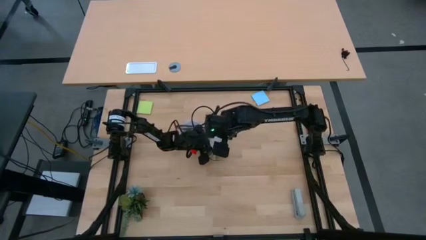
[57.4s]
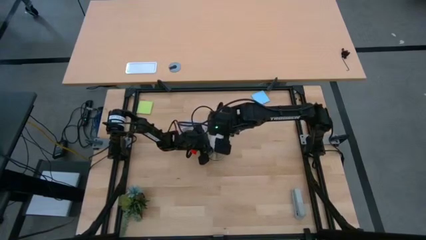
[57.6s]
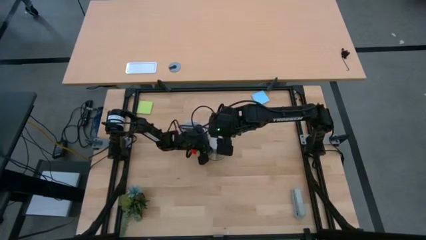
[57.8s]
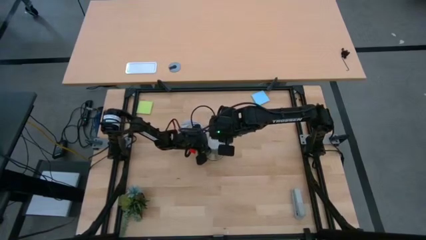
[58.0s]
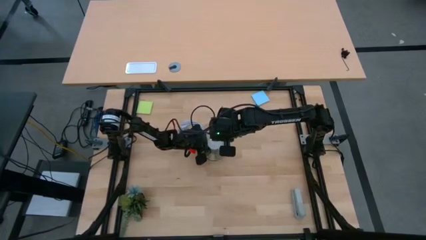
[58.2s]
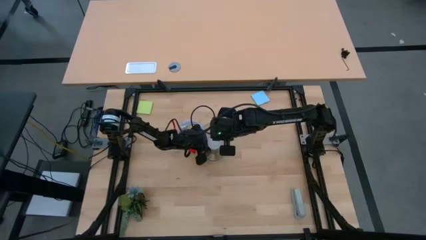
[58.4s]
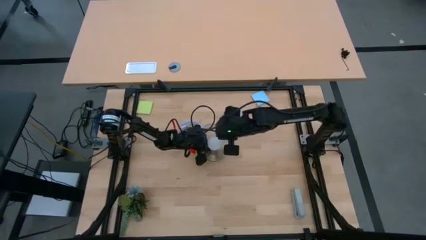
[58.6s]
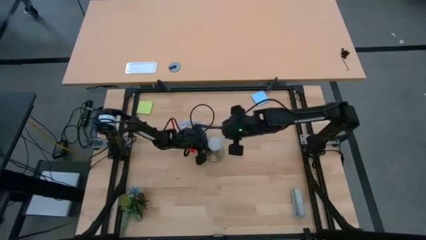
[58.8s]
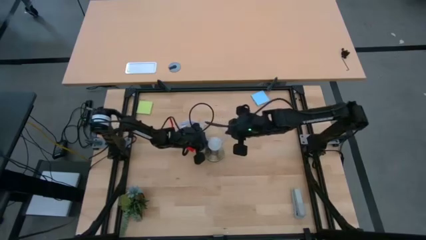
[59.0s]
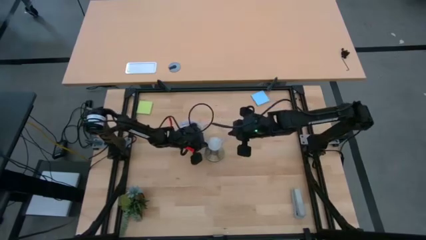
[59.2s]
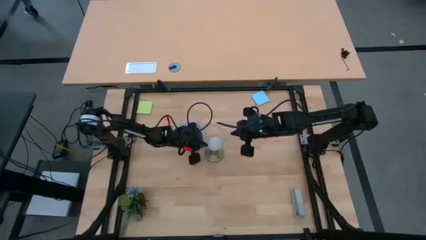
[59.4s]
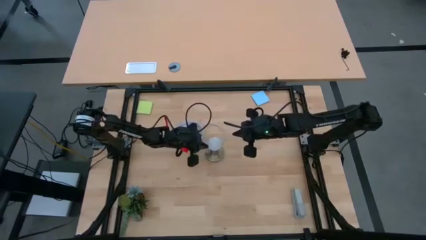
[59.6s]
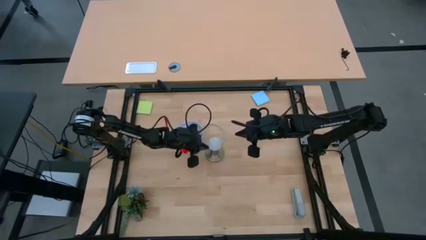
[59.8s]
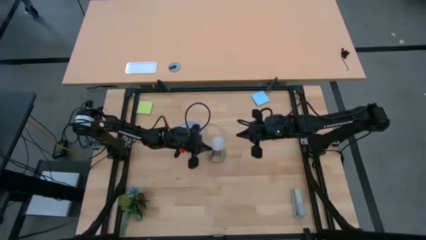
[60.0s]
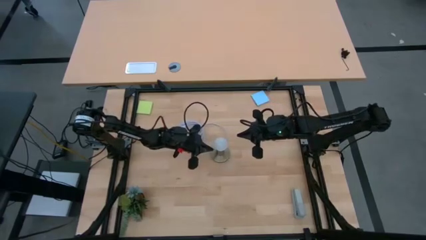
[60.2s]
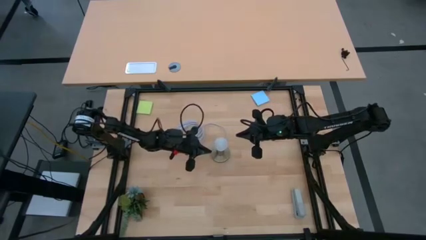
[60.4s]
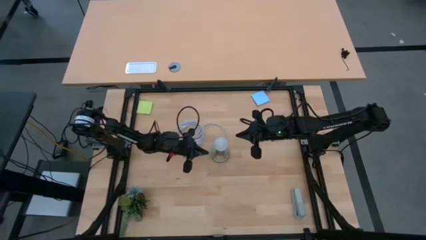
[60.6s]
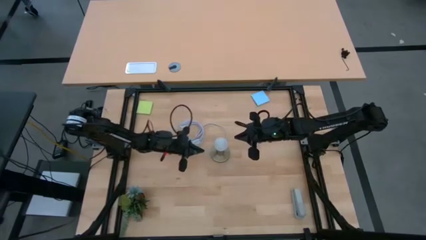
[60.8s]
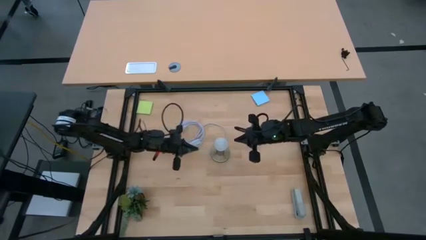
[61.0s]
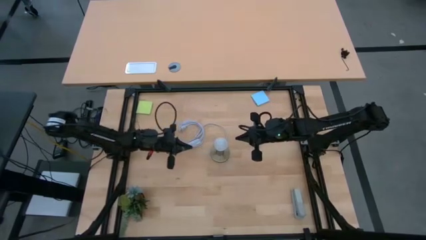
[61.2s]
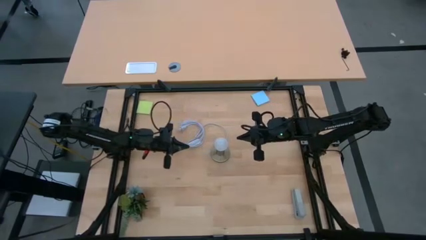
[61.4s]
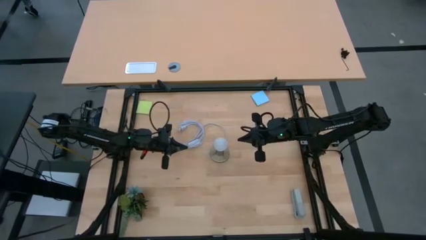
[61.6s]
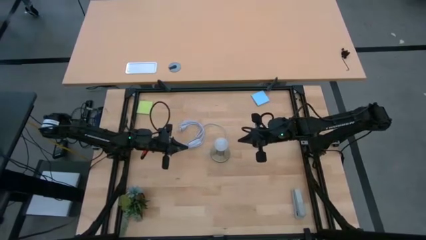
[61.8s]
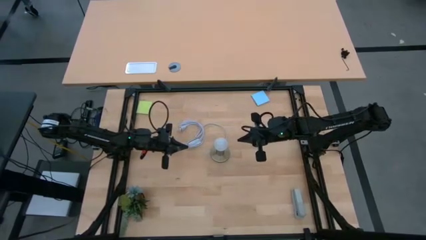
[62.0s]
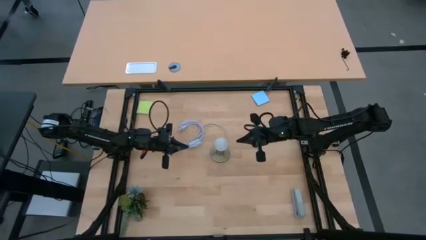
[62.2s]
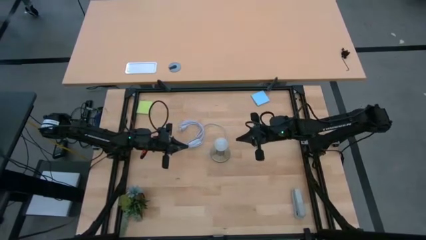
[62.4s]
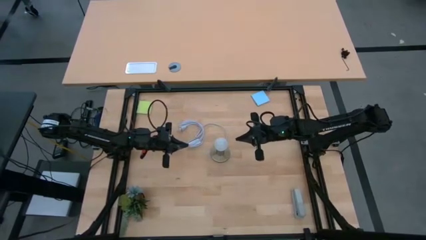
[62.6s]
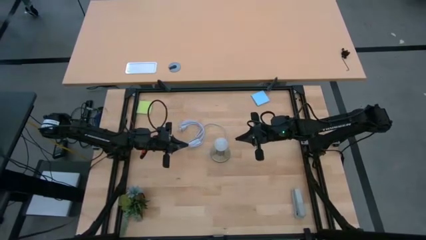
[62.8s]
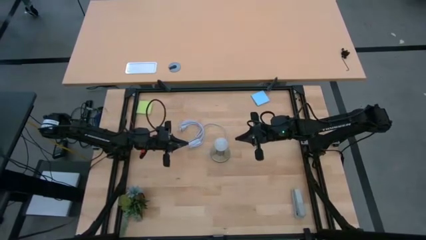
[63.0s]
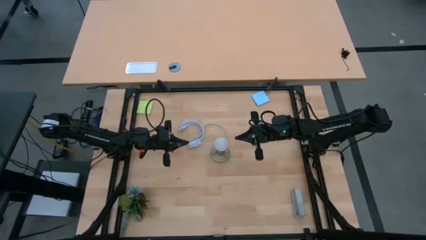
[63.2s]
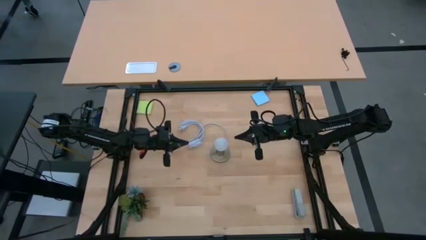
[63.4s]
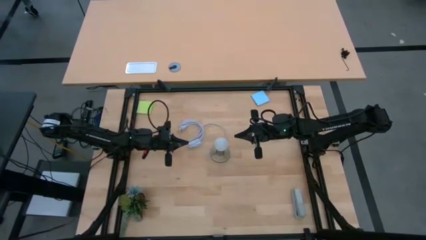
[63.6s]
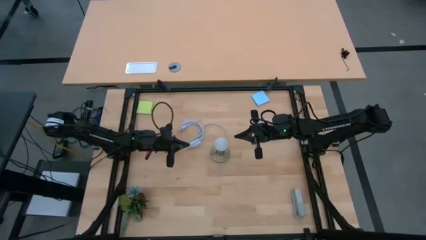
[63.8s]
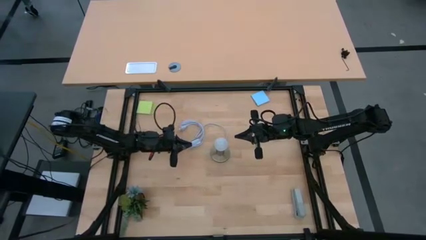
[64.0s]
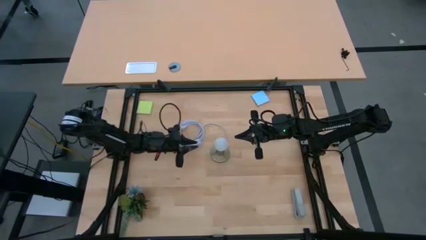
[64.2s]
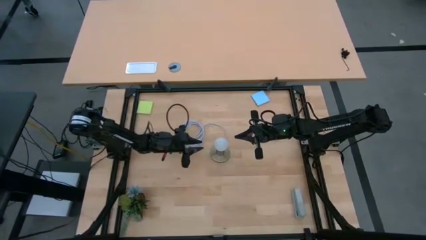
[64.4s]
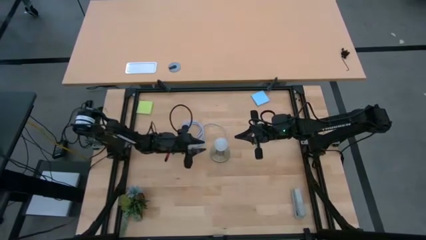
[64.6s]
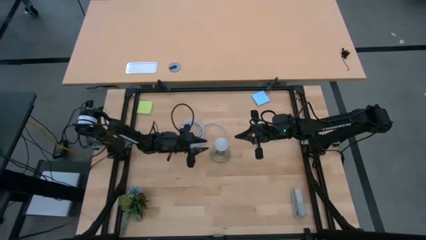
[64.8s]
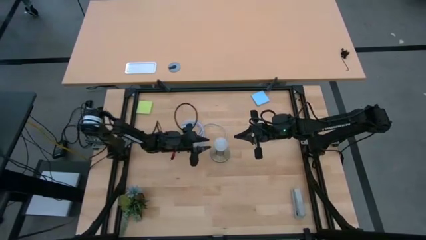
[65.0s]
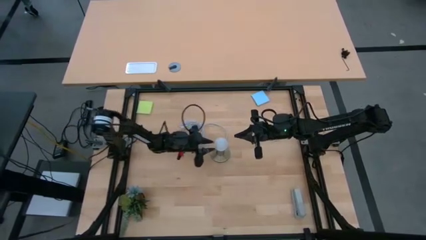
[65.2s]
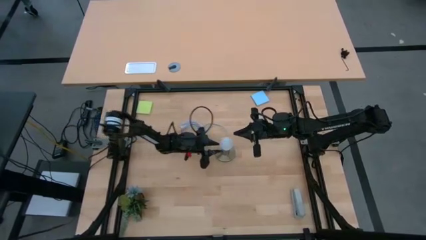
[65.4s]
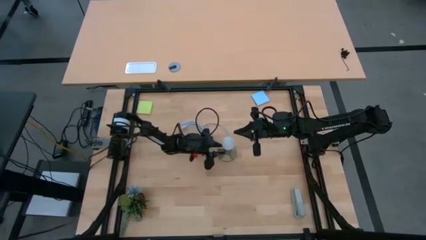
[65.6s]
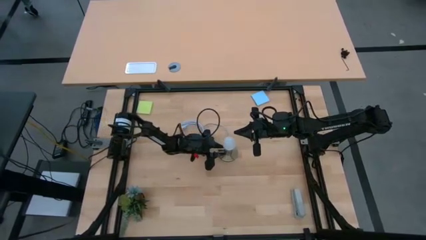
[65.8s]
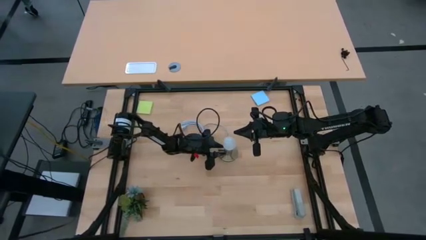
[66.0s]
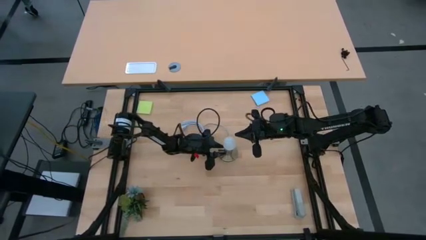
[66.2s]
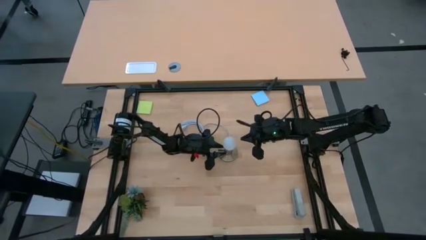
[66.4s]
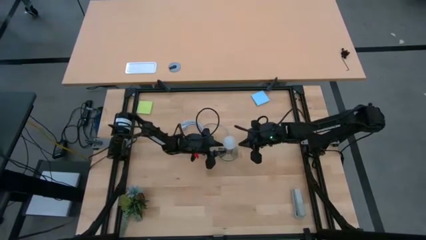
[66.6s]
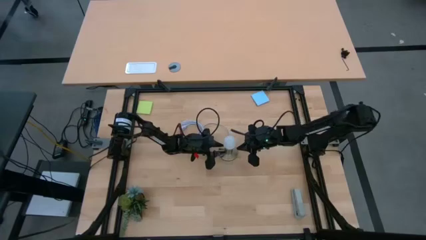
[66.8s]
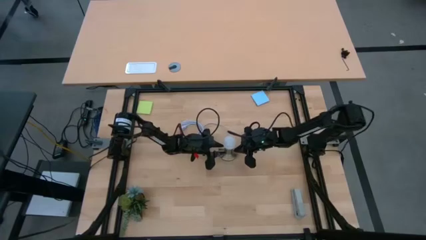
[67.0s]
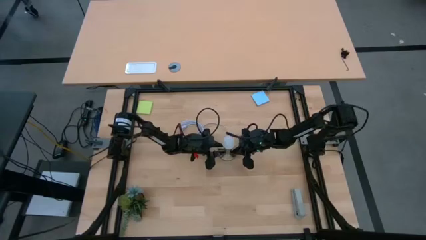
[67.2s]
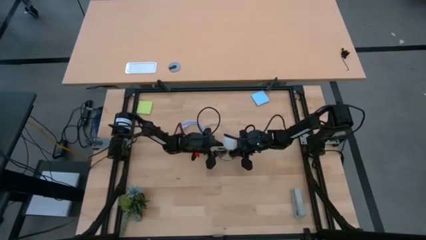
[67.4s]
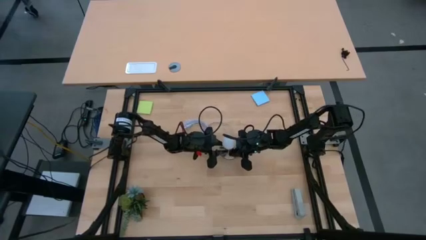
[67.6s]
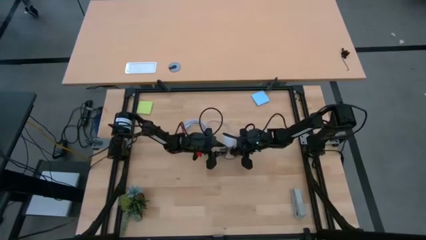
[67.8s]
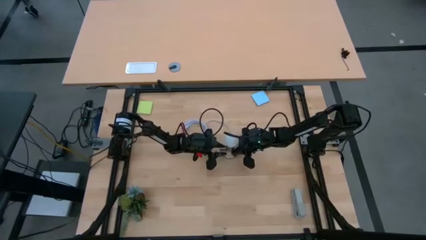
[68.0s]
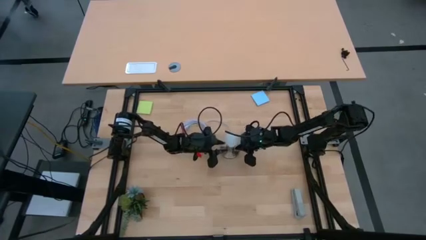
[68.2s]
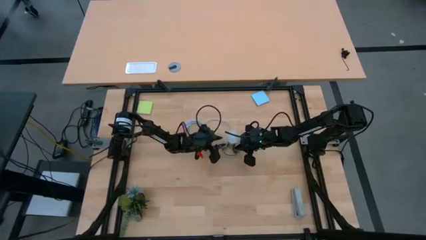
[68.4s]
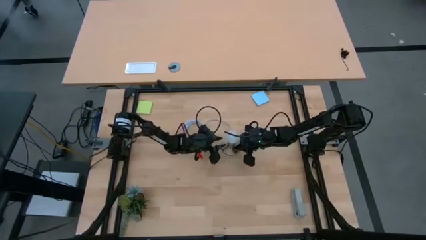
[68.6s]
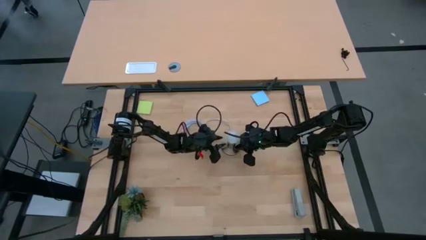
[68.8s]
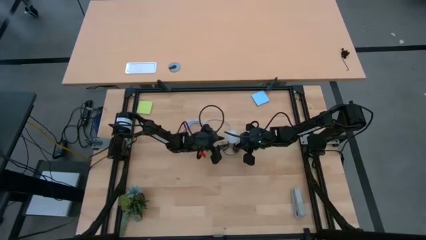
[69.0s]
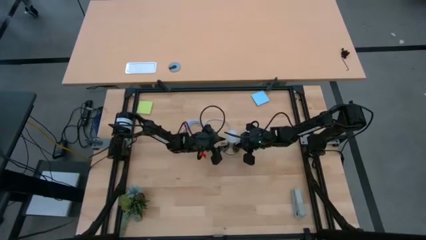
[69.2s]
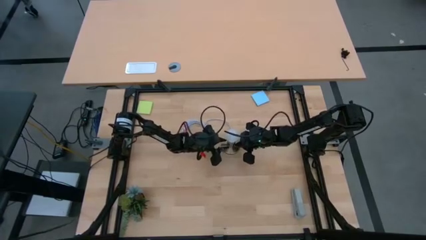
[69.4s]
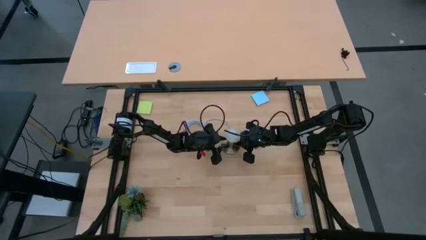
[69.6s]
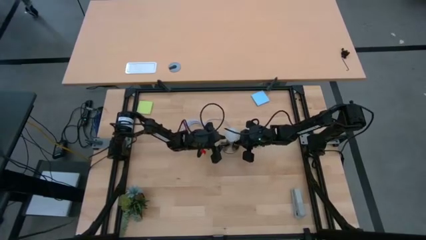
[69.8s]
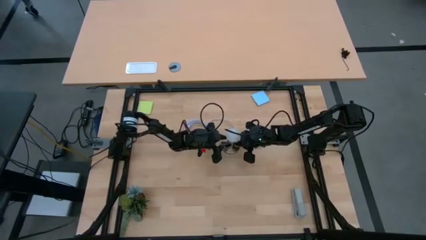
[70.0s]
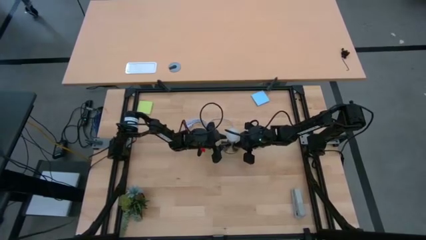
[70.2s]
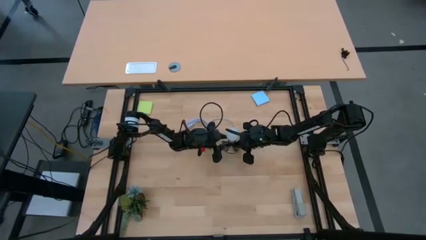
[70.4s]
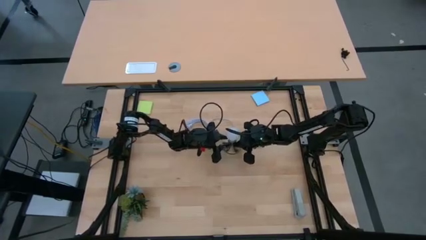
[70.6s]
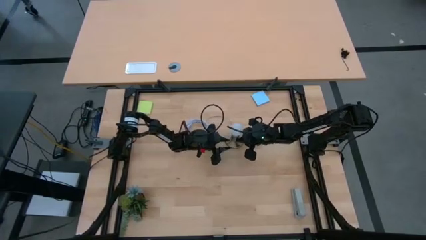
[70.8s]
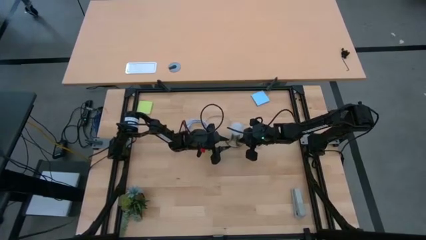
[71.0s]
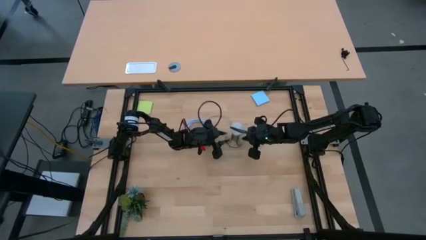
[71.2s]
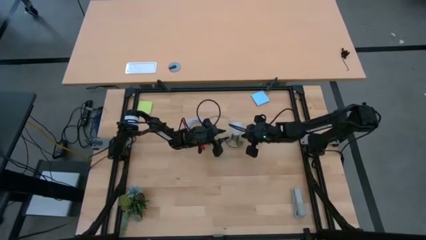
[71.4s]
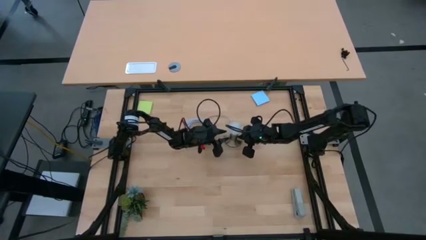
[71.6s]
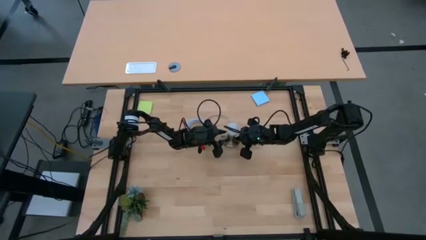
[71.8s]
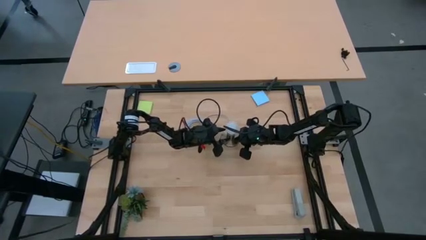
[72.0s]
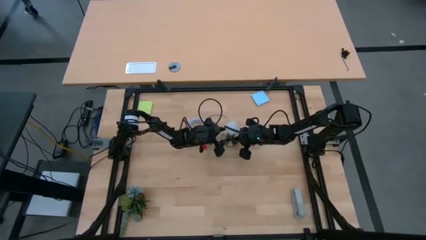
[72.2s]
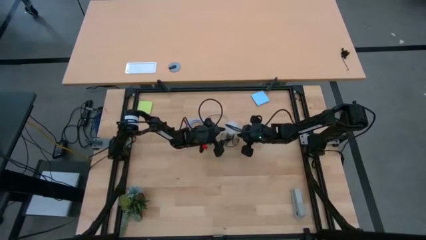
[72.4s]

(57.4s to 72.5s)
Task: Screw lightbulb
Remove the light bulb from the lamp

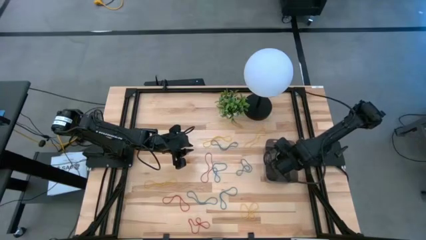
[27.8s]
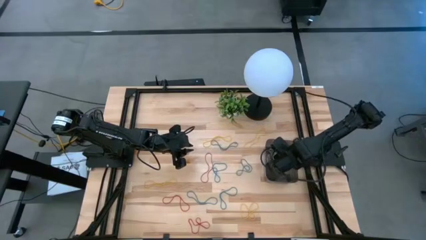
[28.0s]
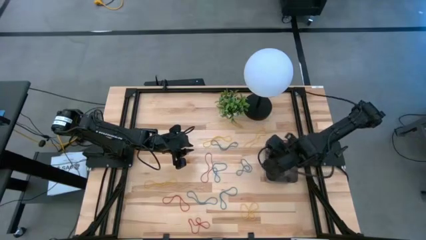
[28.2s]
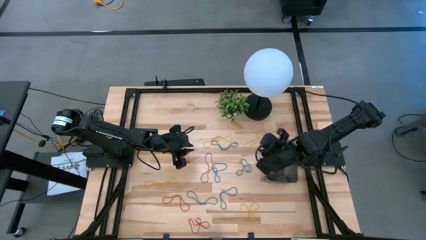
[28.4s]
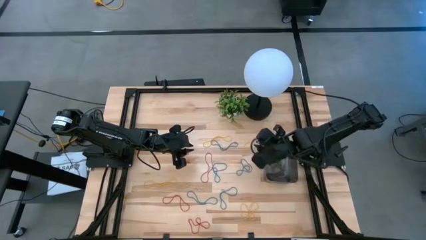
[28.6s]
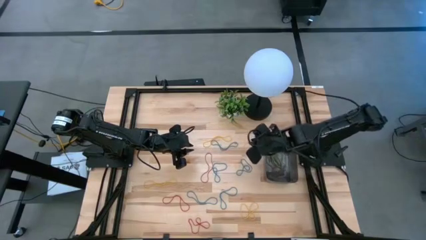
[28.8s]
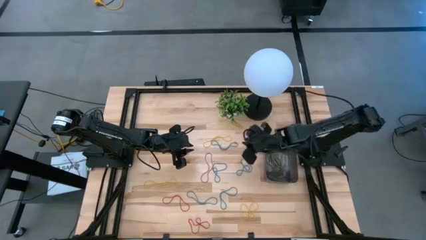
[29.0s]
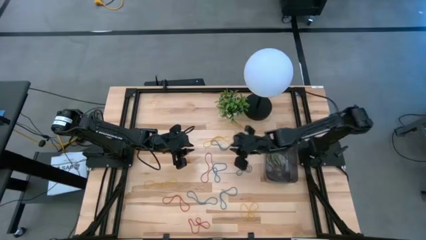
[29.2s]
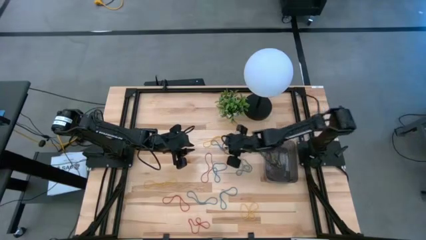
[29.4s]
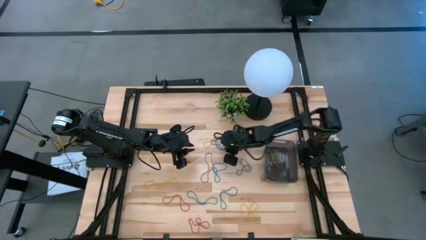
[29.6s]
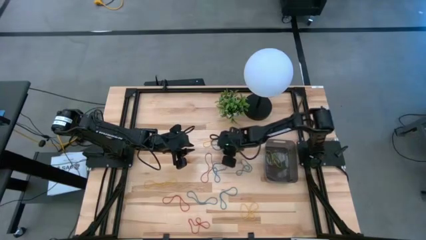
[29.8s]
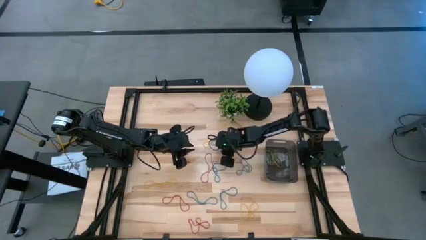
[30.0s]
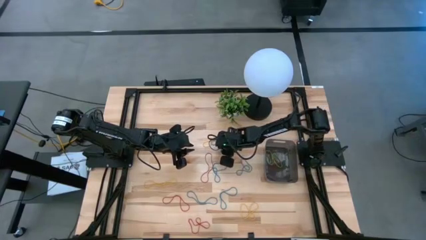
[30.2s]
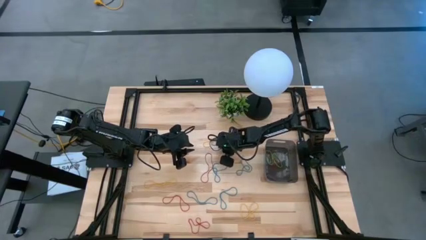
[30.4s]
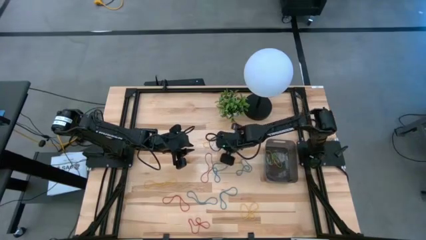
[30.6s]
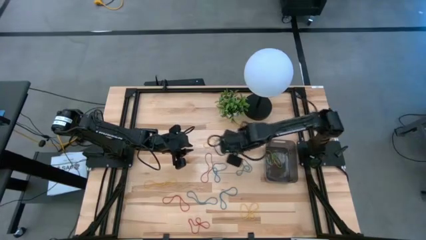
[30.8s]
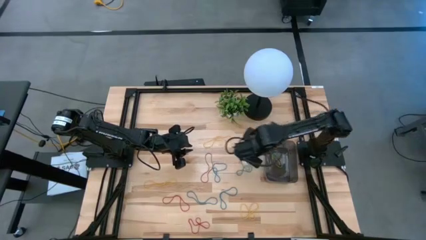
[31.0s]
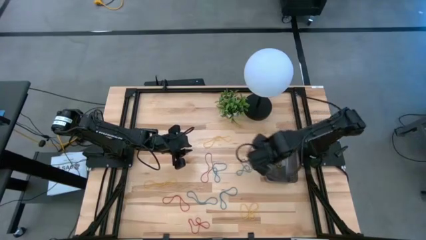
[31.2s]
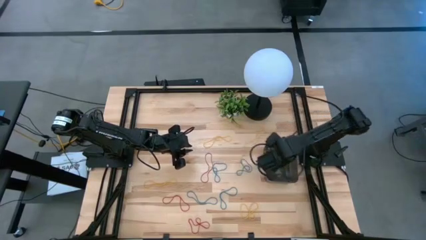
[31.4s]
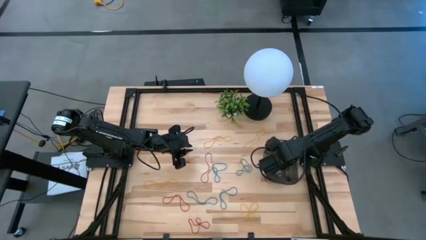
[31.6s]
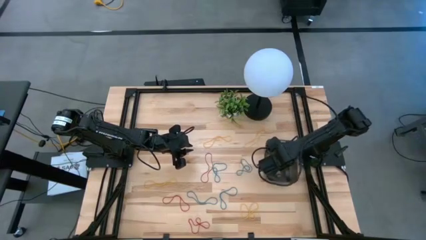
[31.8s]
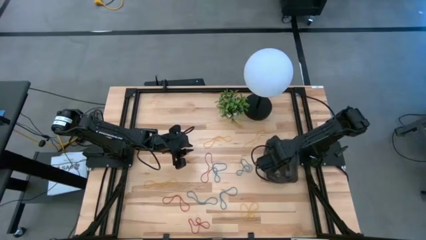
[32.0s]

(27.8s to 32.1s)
Task: Pick and place items into bin
Put the blue rubber band into the black transparent bin
